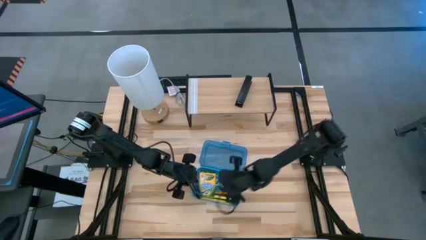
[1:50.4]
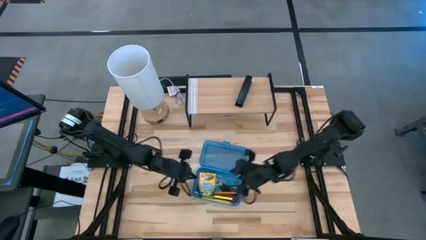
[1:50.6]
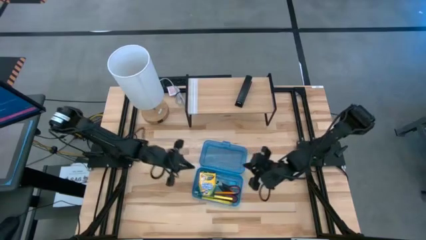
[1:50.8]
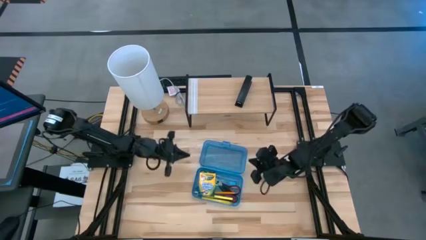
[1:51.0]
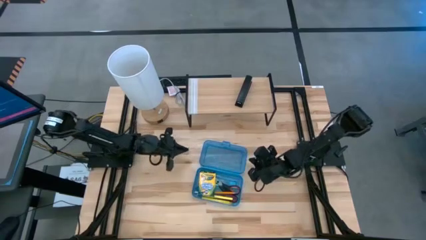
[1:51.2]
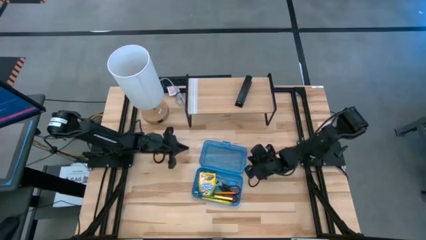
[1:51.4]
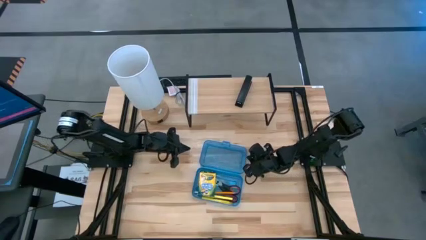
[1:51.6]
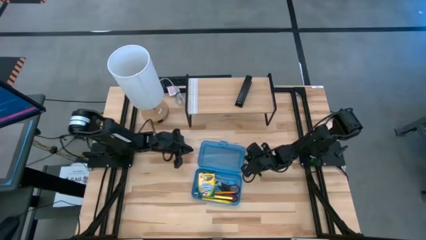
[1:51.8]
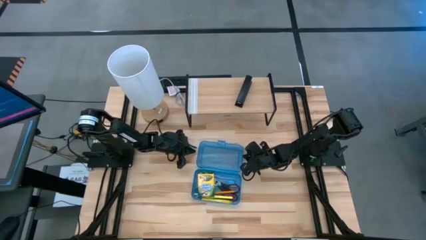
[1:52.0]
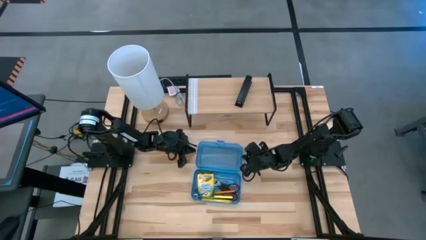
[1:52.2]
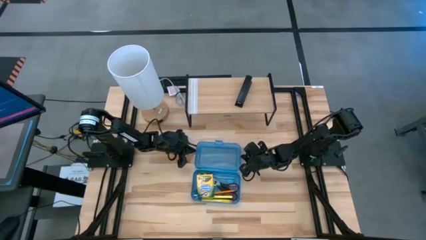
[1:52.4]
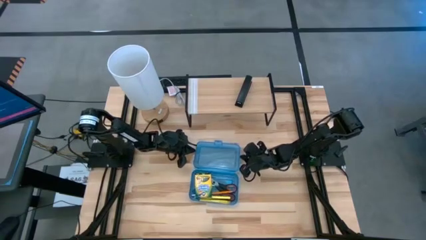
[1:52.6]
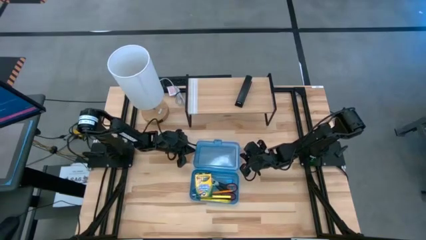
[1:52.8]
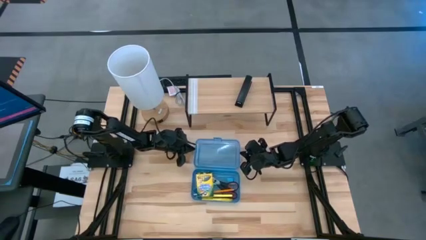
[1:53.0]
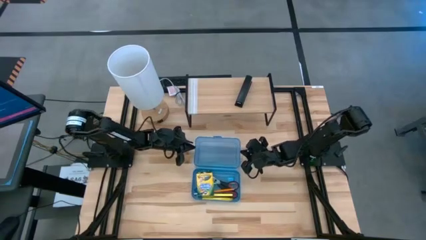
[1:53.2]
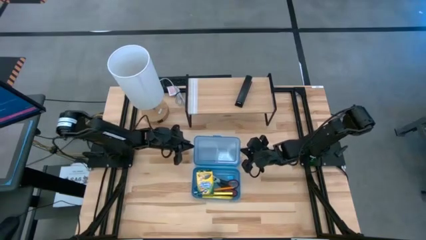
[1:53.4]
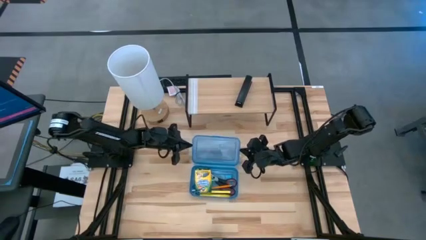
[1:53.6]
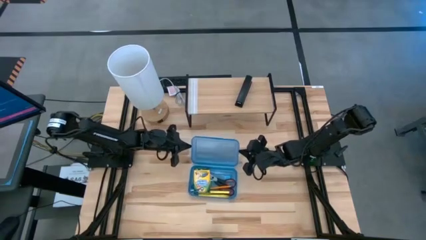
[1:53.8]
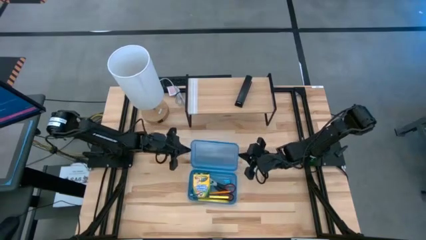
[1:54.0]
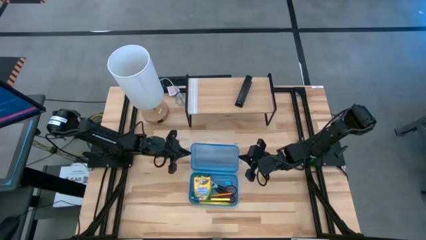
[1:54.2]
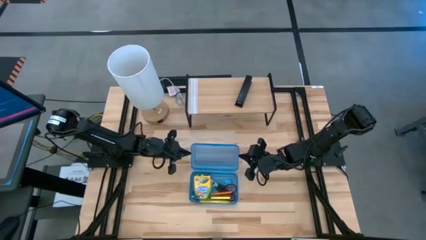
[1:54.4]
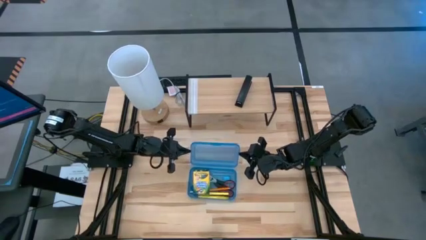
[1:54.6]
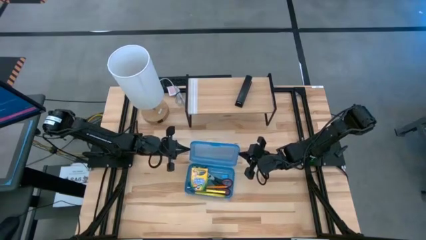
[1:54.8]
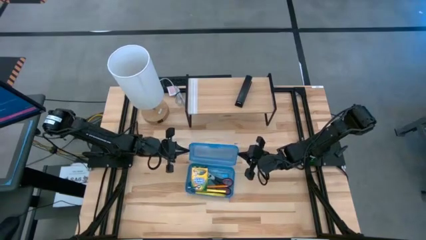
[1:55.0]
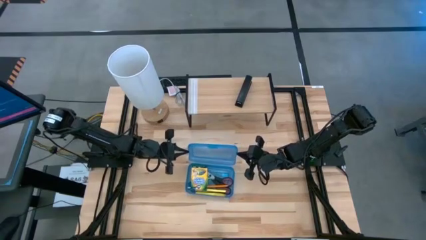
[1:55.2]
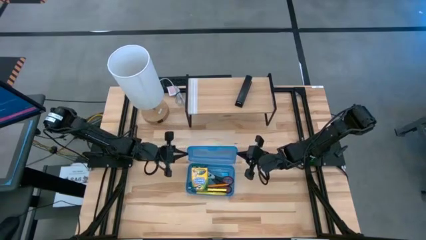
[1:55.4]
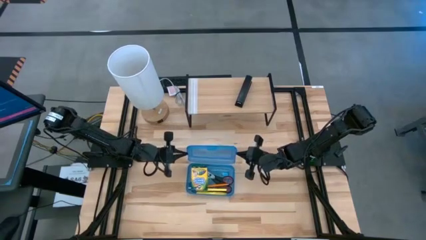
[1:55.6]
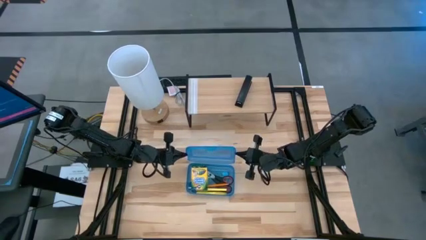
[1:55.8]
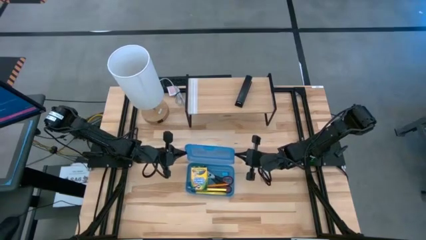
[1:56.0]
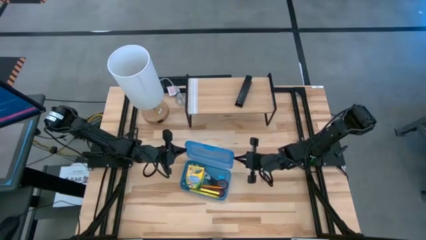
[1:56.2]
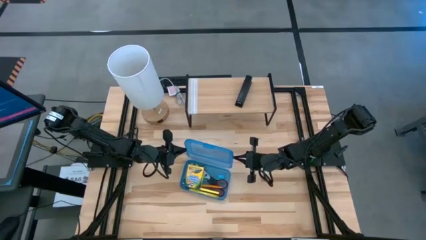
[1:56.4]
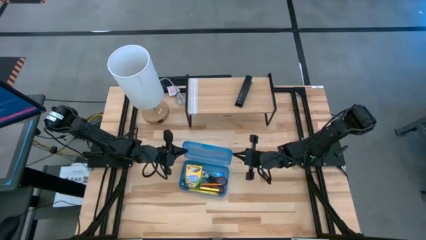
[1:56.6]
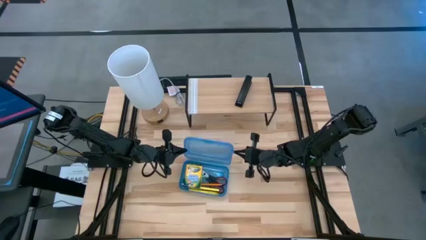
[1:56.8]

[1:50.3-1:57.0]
Task: Pack school essentials
Close the blue supply box

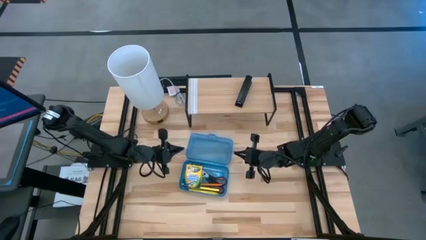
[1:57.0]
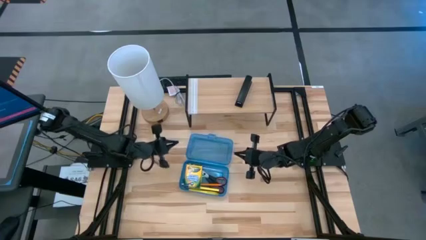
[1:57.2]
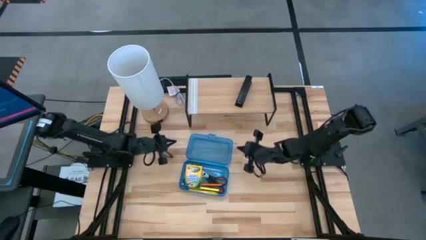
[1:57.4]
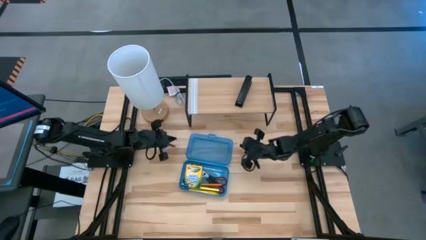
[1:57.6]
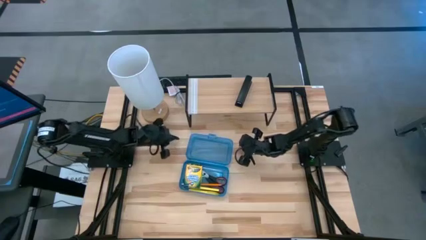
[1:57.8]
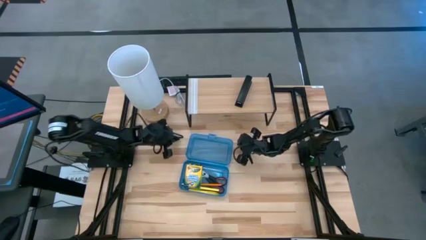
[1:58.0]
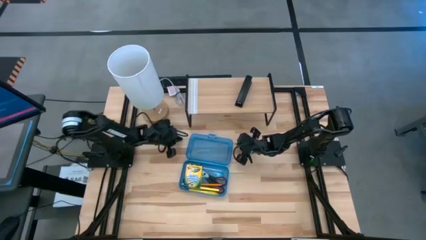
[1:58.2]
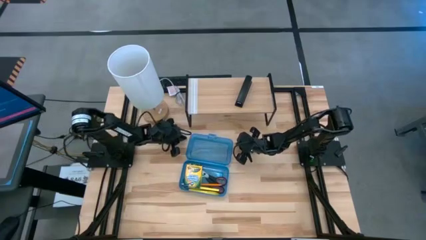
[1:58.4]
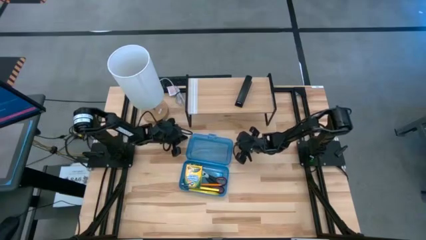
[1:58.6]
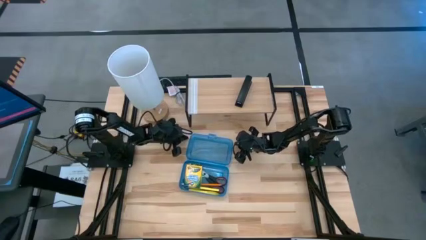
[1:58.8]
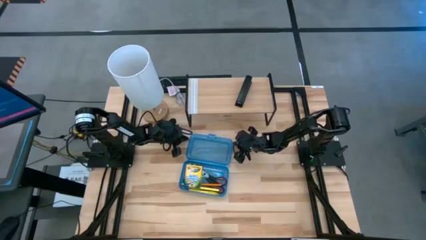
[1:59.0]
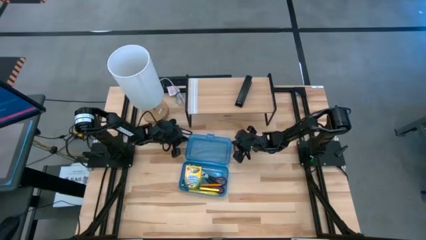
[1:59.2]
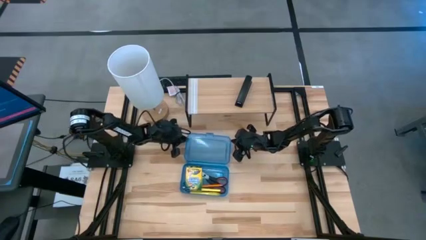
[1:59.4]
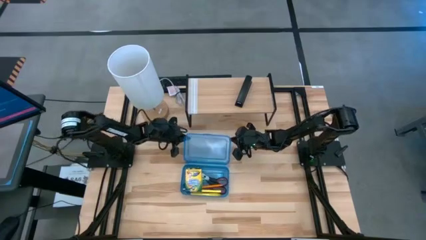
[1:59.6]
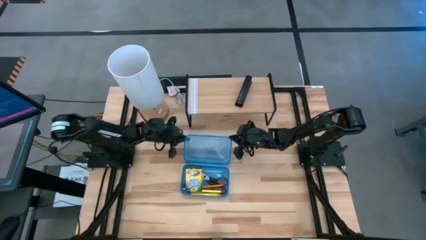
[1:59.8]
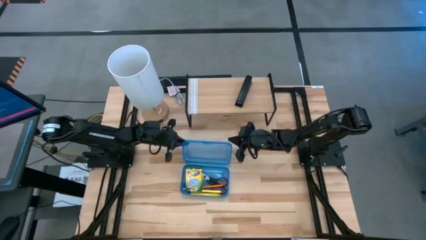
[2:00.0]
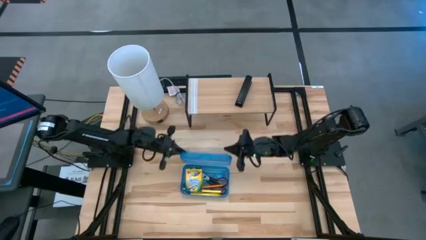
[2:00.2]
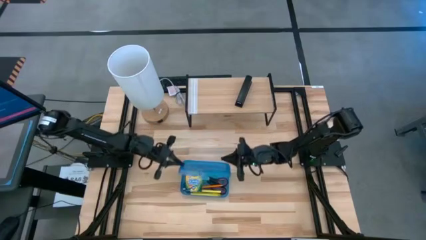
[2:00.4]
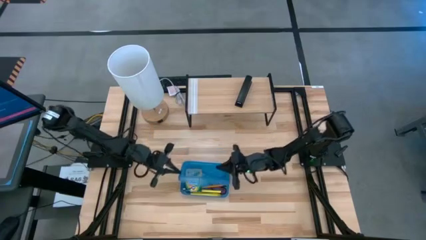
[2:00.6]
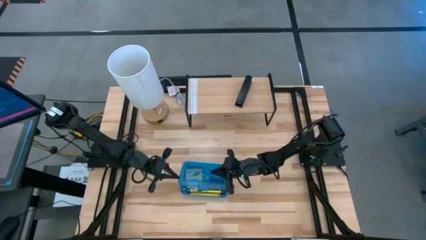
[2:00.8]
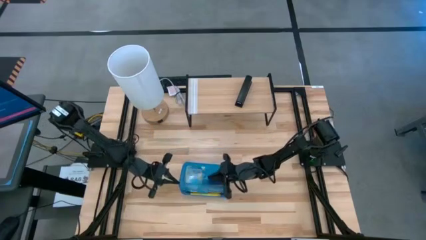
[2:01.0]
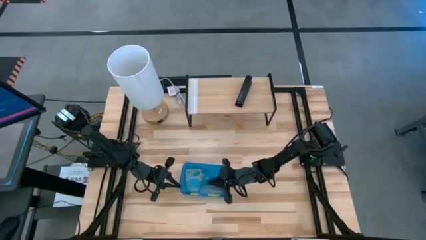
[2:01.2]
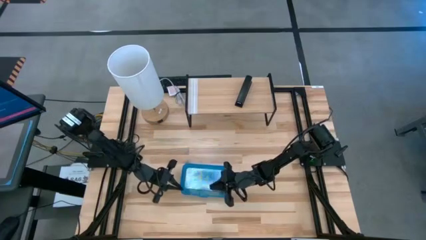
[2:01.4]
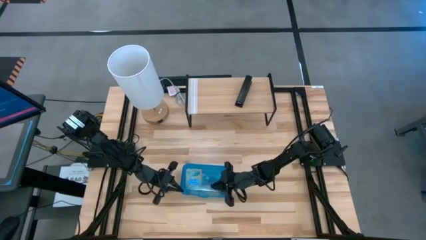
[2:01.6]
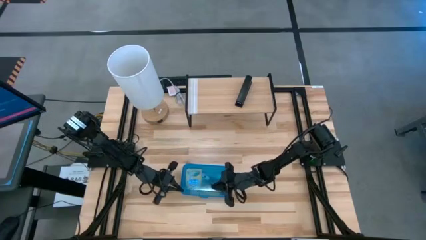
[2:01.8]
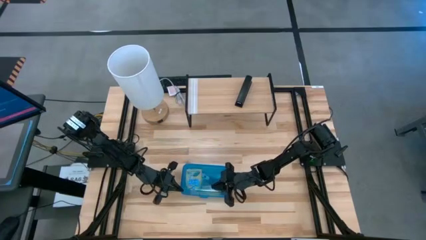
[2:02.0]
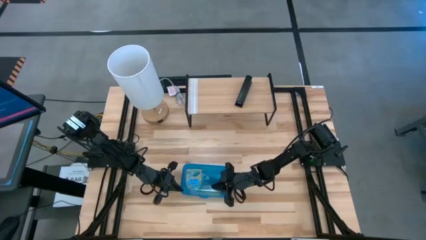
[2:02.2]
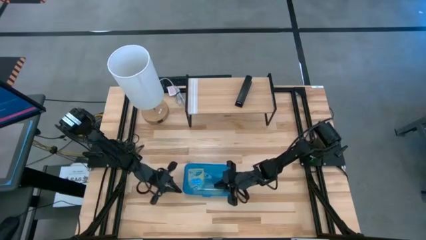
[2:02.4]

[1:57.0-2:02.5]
Close the blue supply box

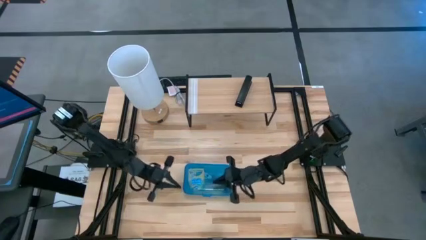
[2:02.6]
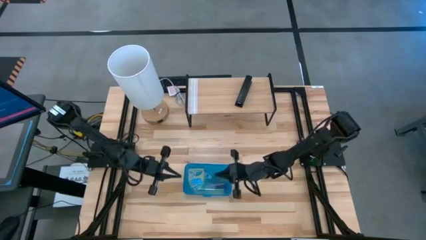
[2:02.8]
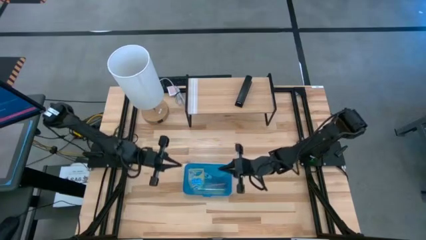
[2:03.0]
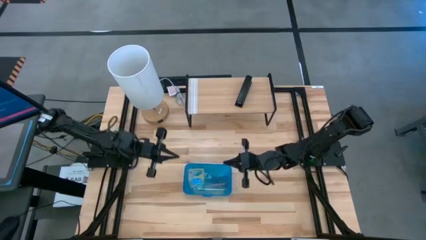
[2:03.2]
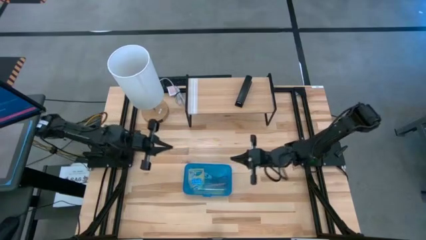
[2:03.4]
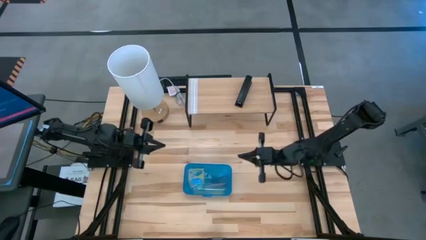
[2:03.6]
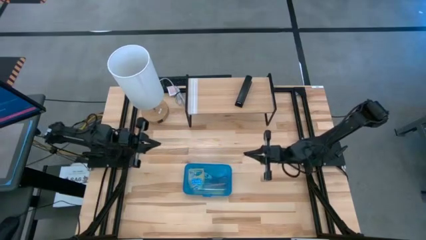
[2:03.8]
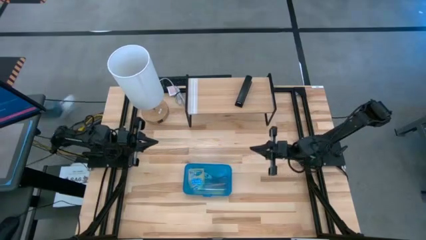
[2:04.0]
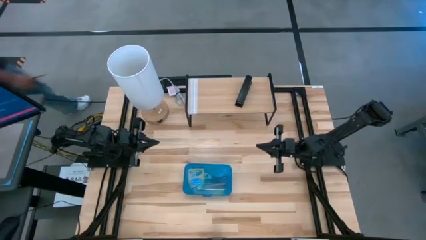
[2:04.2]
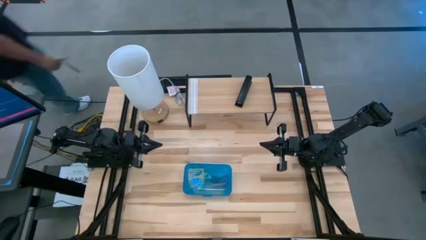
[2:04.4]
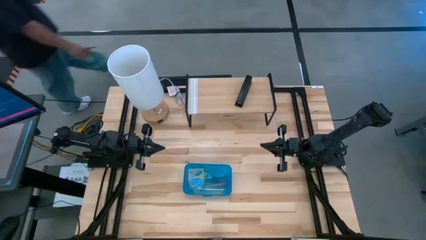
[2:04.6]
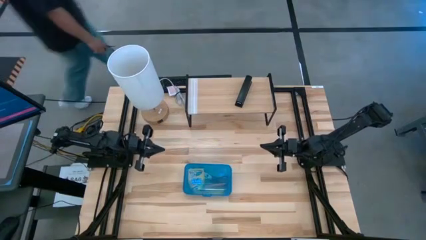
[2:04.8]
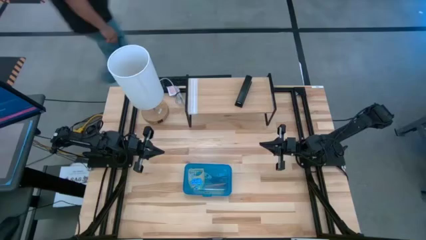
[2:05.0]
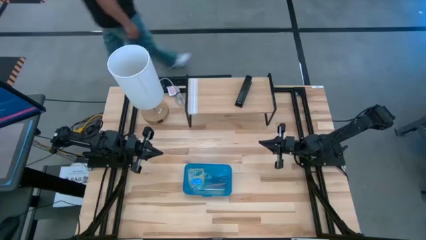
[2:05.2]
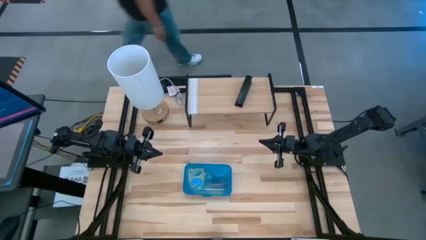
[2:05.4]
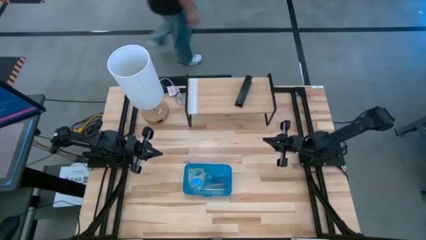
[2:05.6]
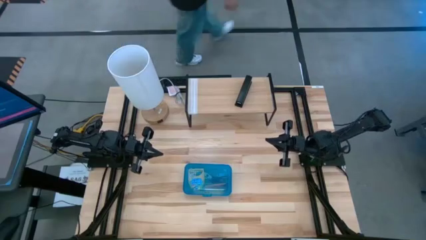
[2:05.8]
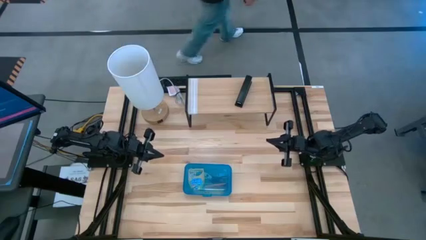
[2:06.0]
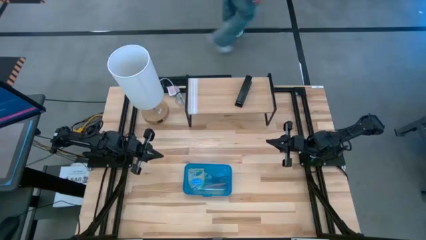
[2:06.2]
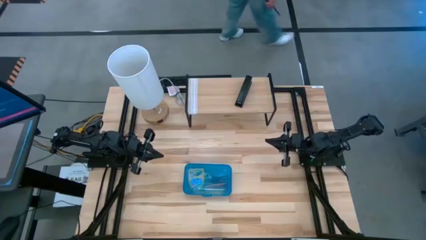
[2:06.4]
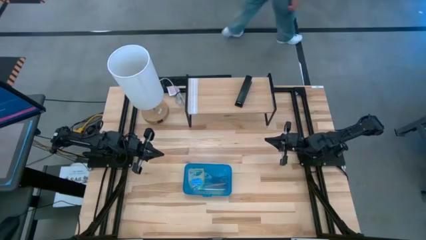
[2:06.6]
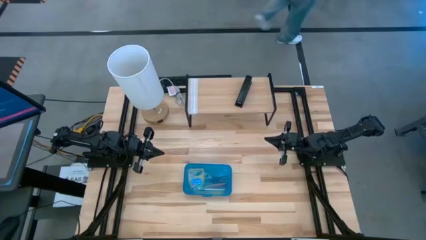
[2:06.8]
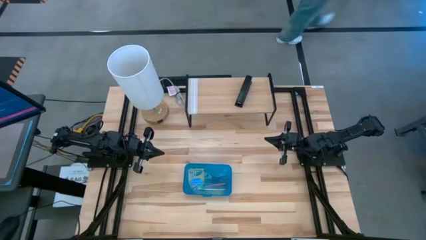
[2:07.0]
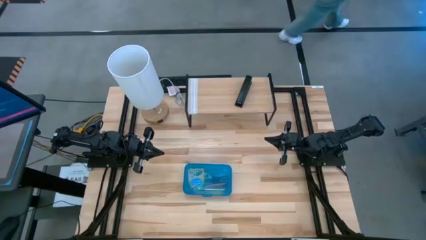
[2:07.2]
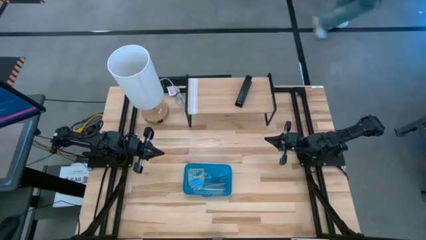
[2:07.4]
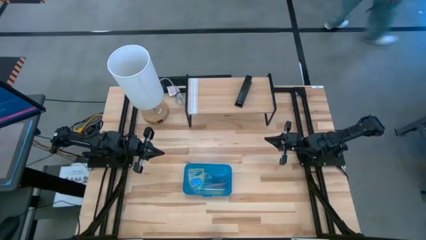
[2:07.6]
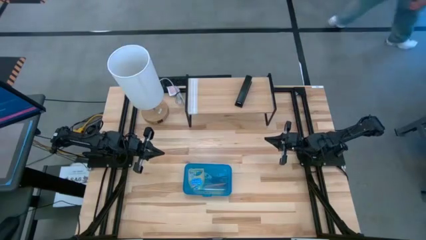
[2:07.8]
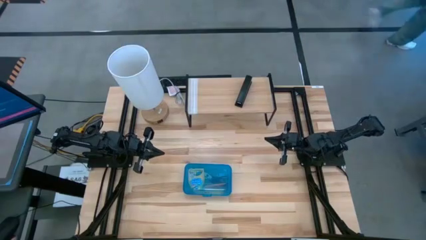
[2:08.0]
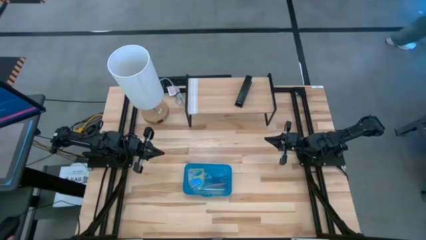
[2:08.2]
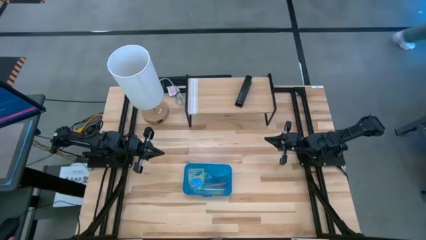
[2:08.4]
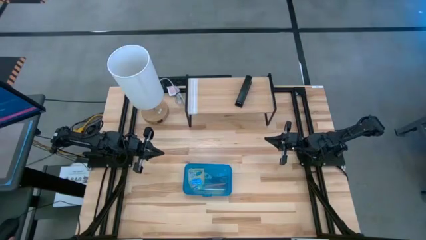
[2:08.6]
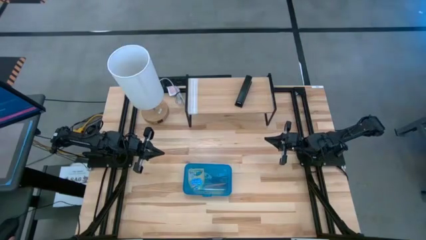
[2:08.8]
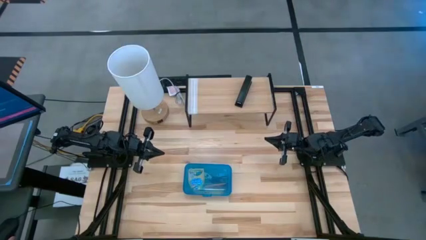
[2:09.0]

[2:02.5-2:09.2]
Return to Home Position
